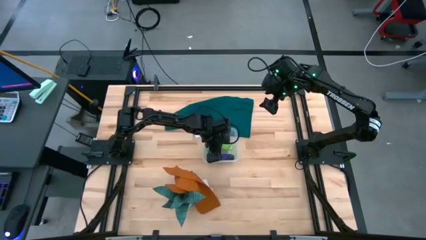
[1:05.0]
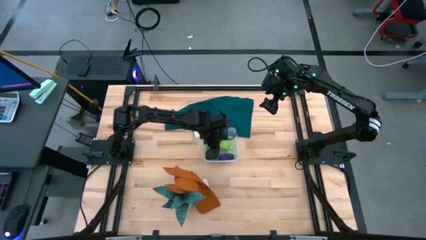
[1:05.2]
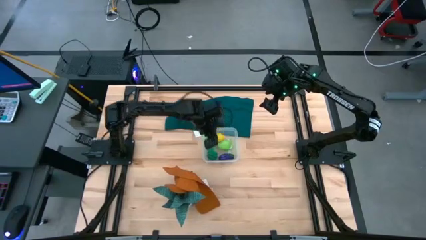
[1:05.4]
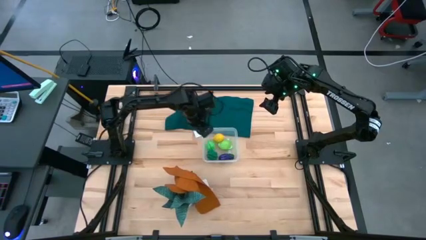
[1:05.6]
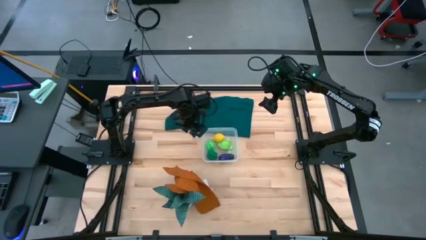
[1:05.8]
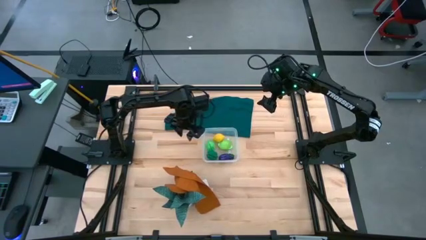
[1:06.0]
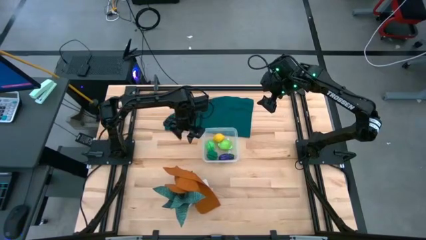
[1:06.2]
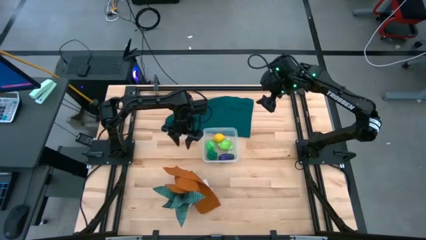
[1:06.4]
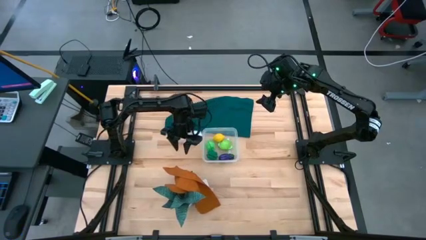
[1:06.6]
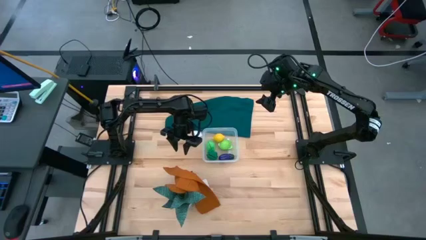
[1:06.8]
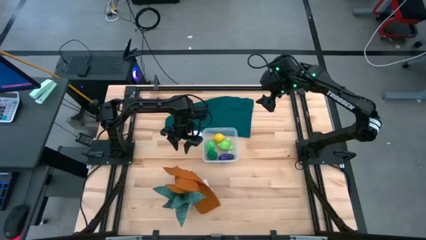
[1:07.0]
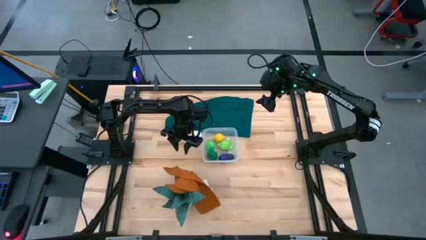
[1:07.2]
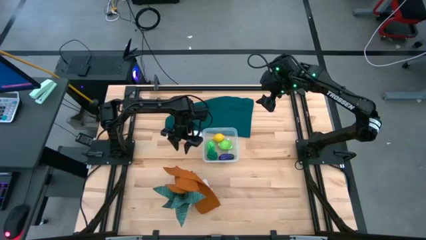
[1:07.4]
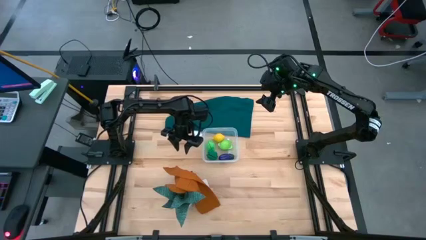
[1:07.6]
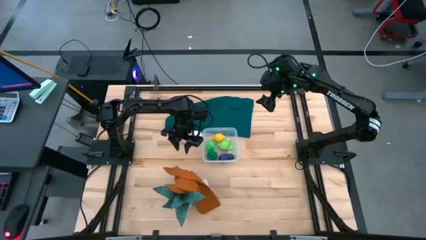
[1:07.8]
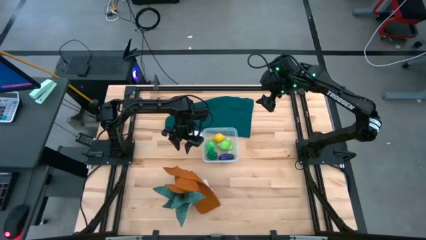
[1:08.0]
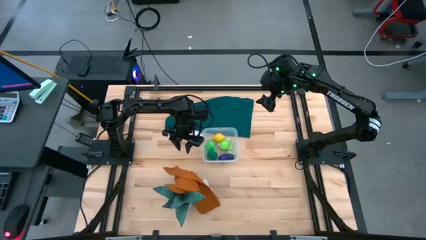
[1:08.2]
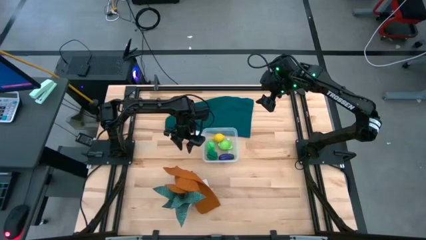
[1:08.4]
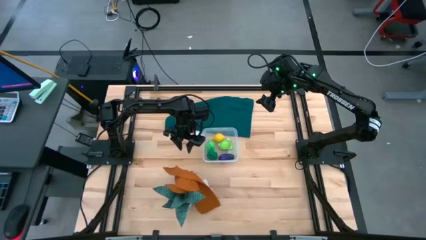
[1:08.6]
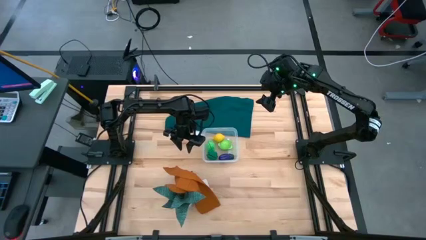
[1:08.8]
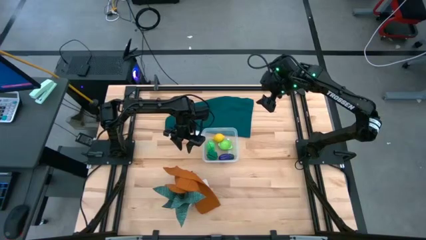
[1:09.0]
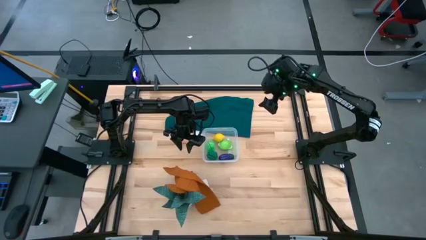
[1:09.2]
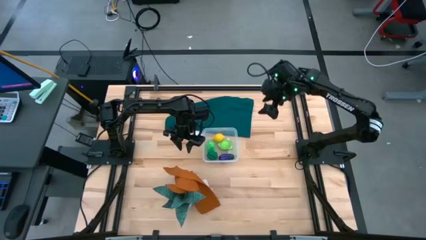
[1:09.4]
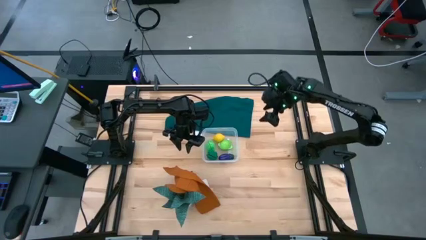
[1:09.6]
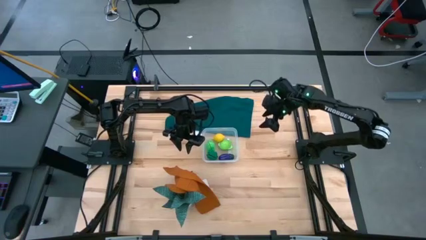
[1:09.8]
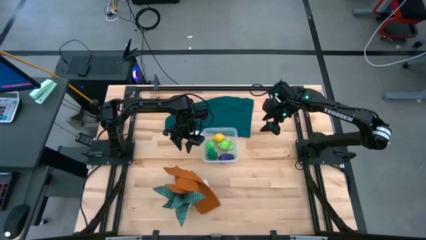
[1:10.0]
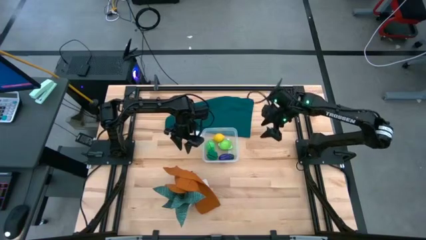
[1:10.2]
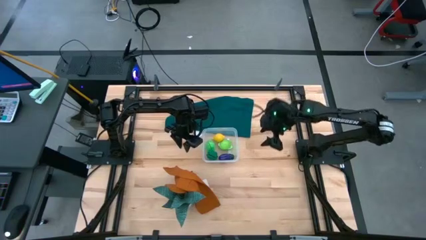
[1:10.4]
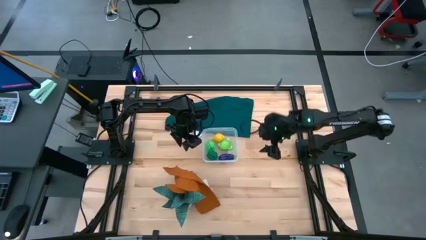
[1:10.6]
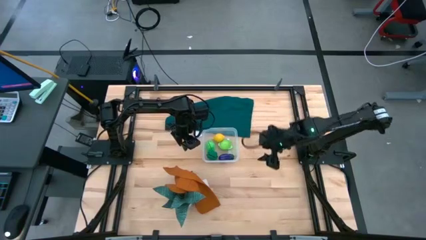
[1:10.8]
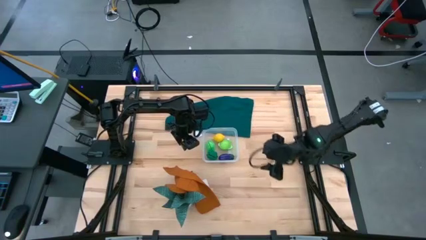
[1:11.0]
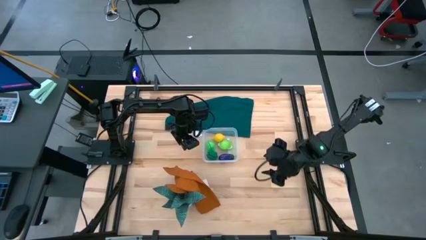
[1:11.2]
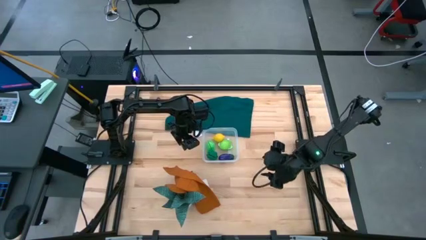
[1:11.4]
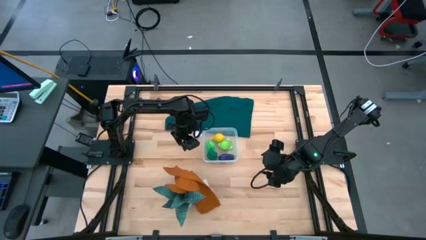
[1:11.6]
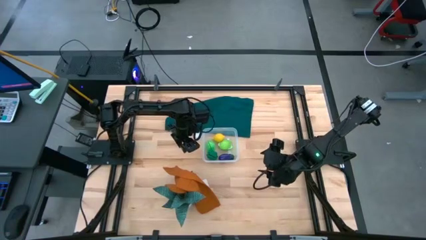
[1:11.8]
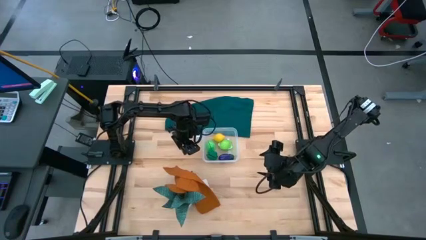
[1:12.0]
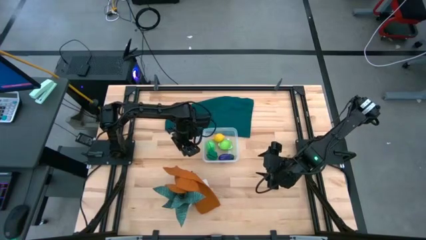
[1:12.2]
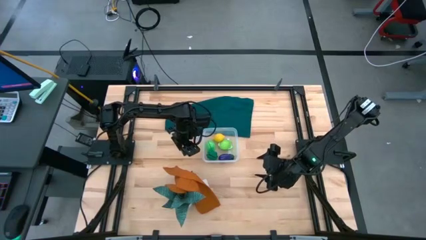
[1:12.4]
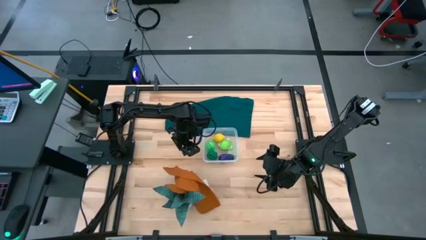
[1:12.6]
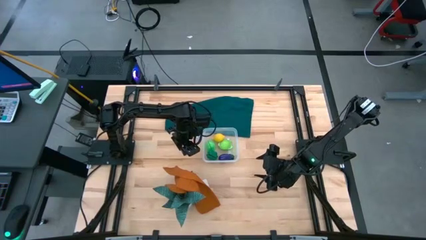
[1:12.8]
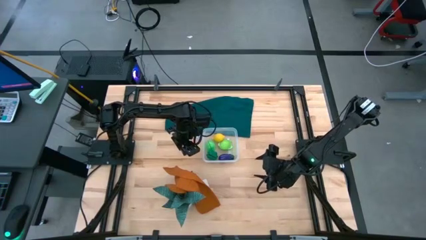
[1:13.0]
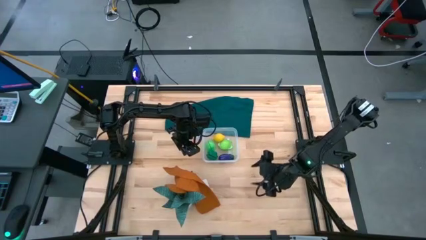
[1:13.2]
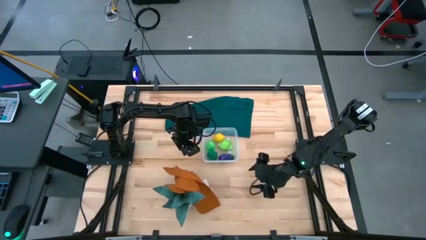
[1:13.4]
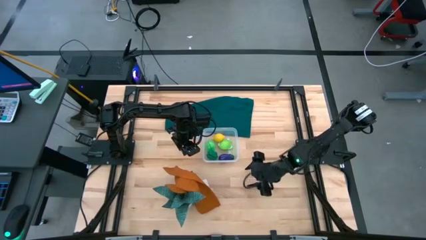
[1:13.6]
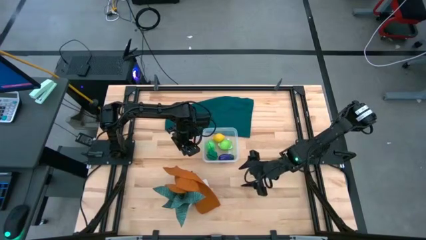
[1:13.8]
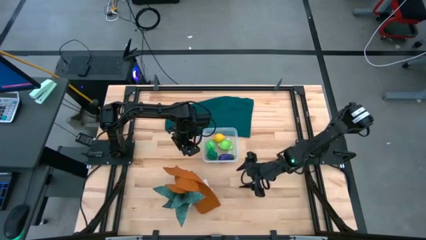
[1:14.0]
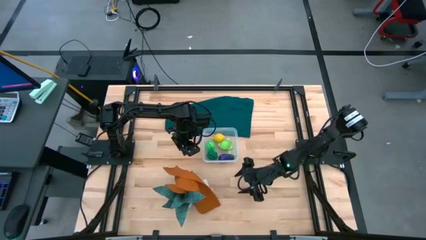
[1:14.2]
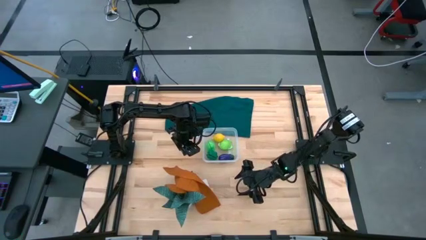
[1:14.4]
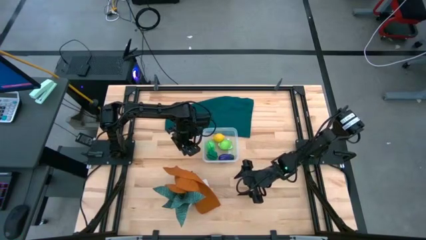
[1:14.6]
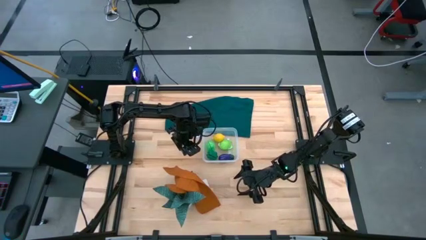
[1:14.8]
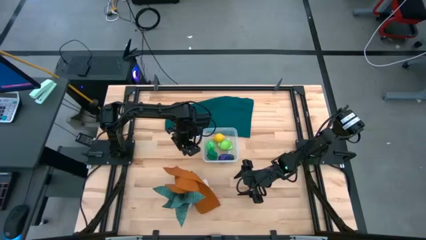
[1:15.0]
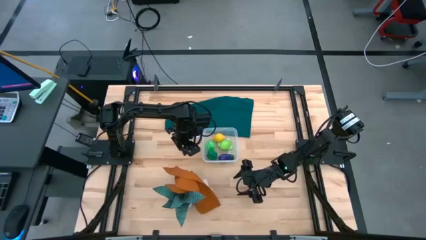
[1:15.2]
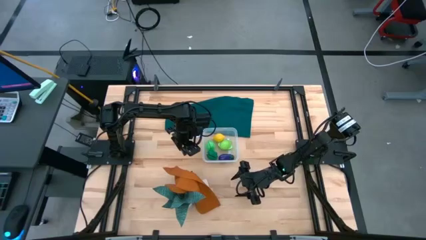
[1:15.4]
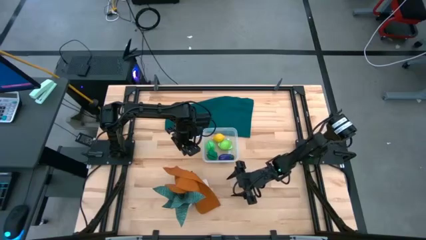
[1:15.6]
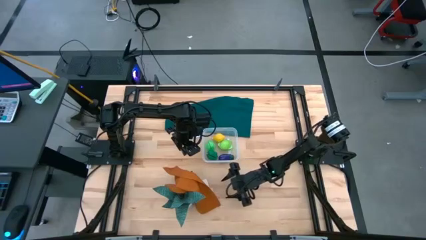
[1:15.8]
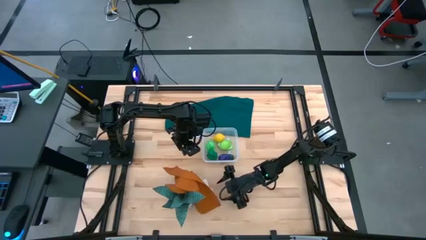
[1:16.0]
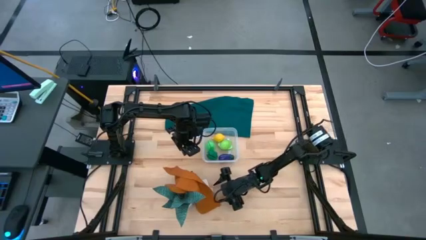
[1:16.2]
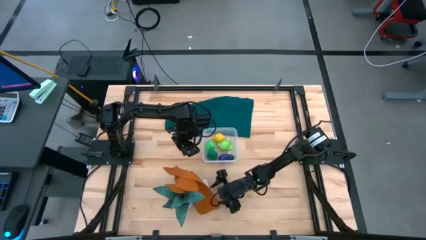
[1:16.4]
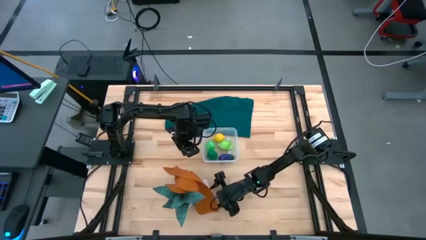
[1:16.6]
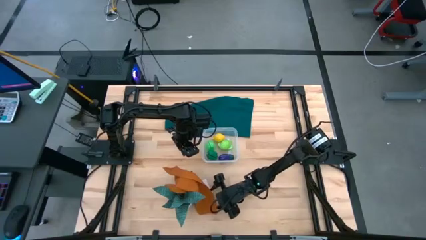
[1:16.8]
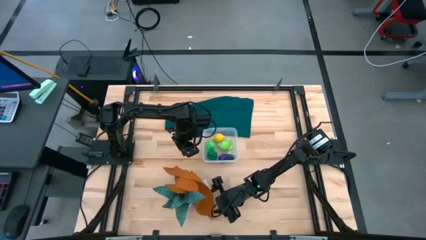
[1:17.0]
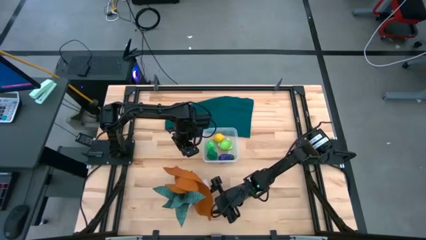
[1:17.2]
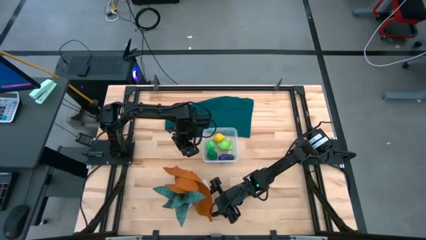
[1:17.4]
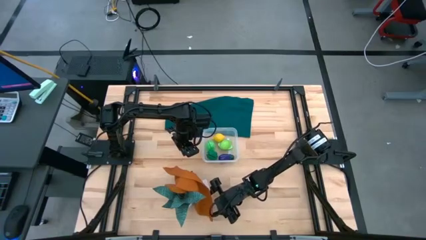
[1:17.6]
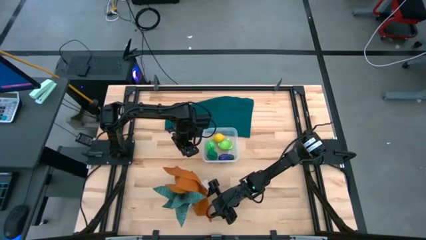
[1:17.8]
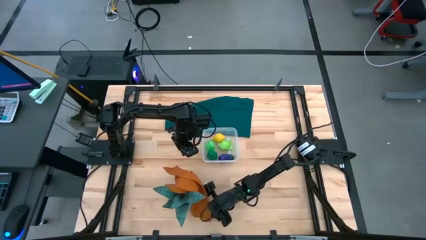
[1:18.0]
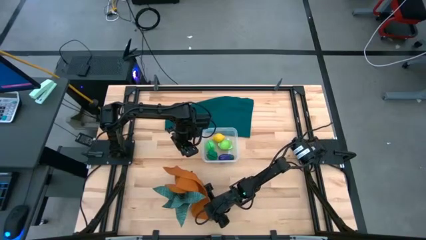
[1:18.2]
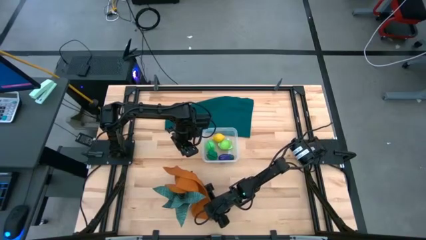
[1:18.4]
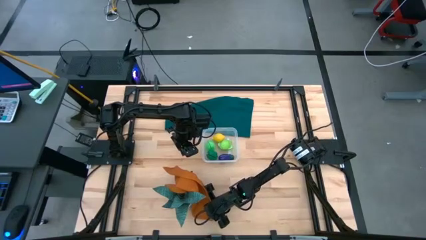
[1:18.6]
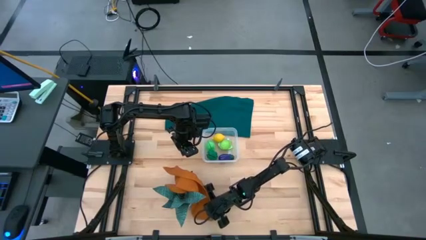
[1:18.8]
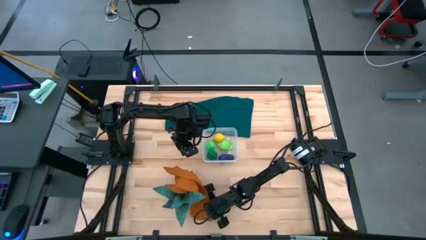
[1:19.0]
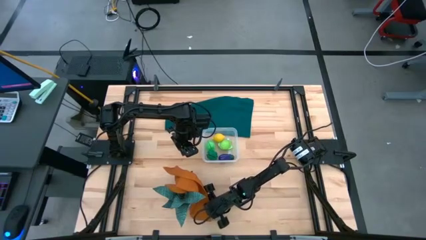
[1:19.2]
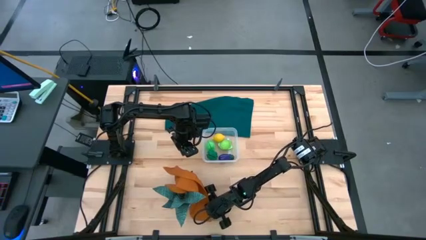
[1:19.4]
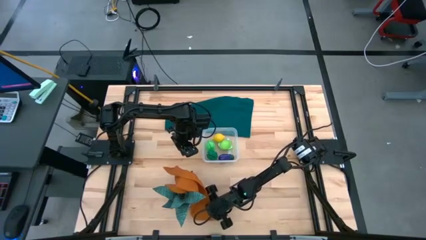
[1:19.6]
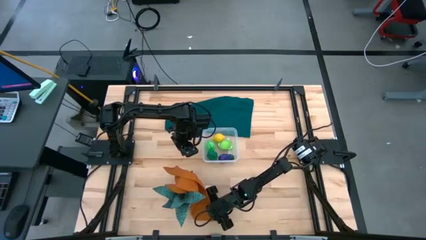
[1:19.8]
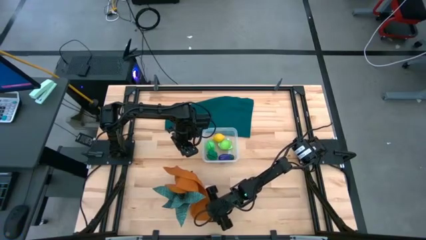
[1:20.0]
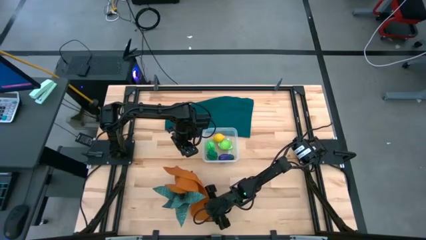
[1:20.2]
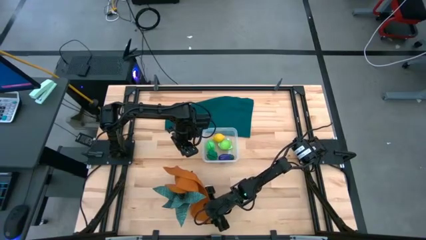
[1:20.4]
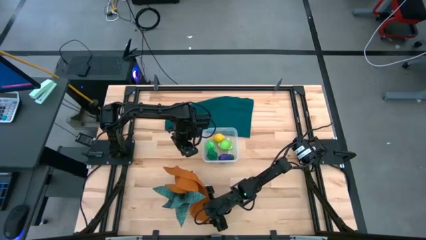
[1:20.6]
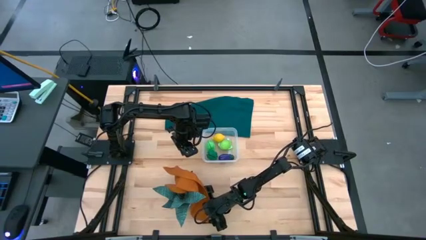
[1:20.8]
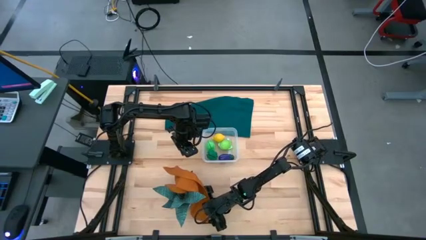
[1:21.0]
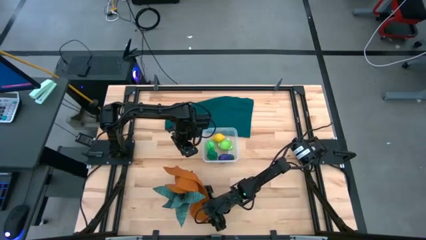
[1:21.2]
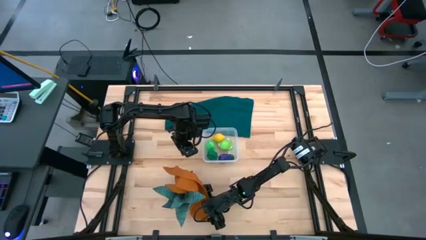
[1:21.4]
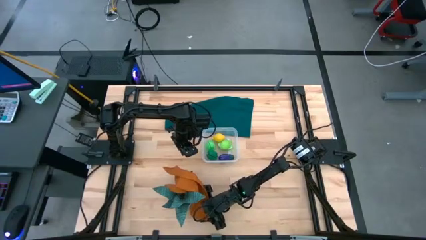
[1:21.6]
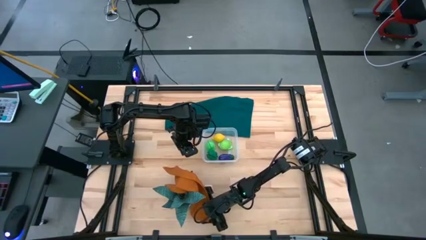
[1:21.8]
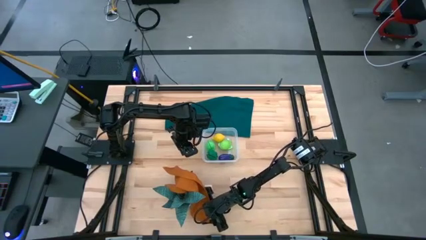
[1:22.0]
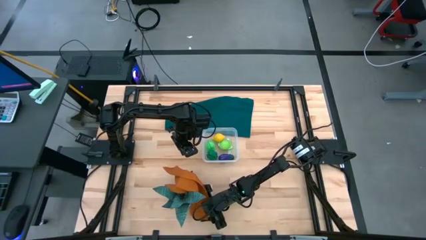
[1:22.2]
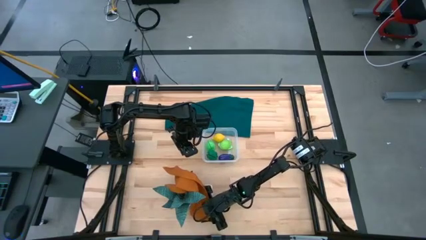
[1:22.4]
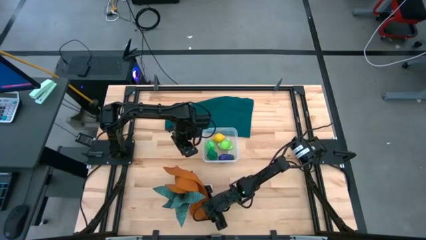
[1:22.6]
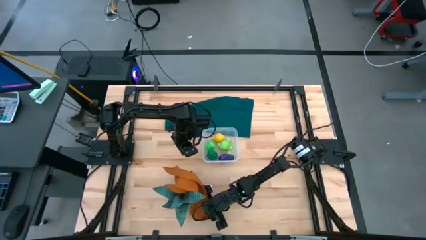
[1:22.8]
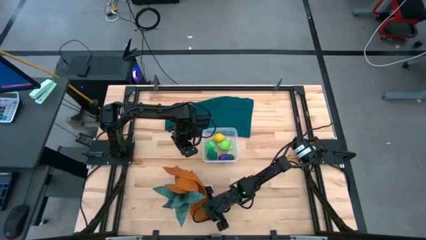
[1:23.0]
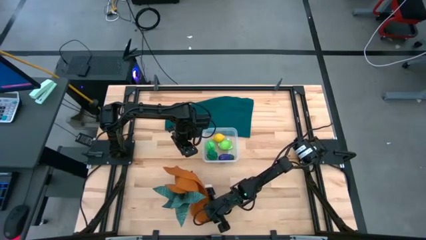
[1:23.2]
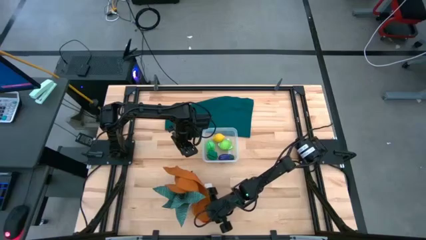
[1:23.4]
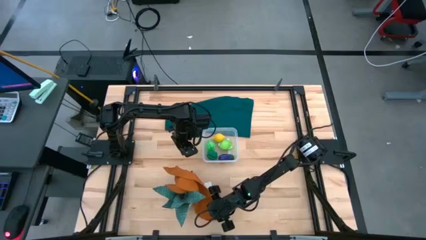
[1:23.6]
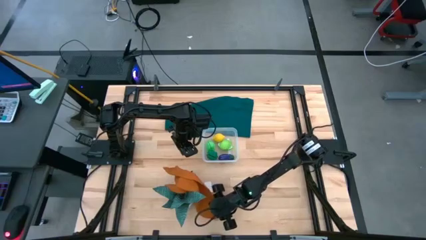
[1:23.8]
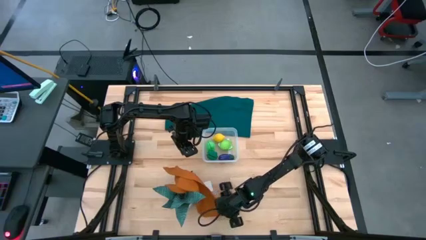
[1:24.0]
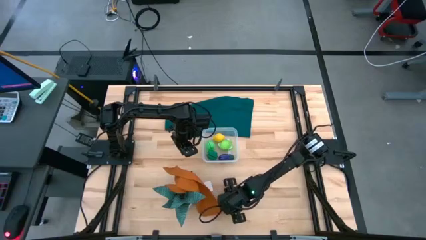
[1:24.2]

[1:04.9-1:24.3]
Task: Pick and placing Produce into tupperware
Put the tomato into the bin
